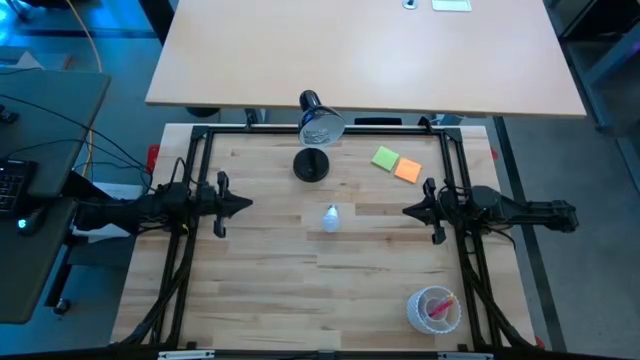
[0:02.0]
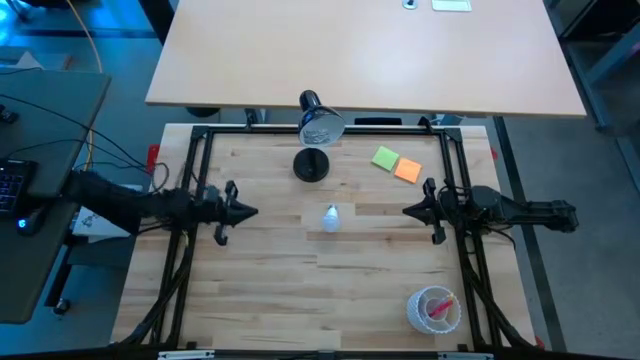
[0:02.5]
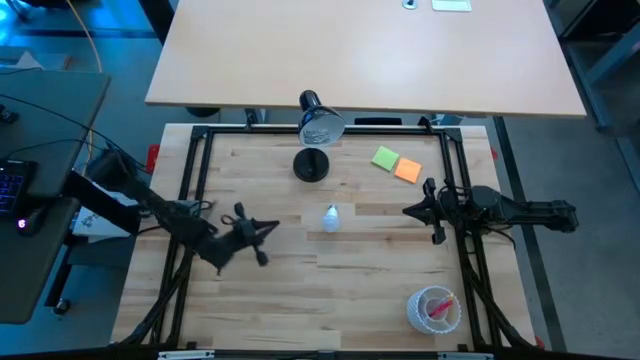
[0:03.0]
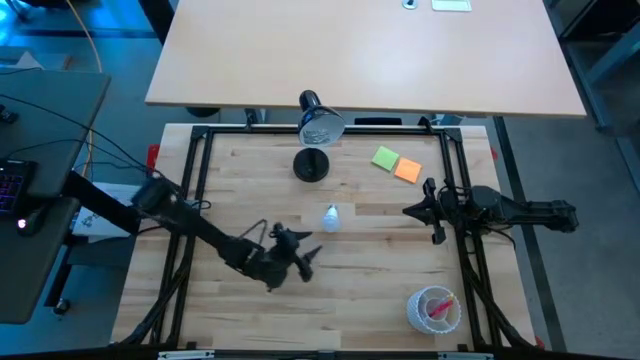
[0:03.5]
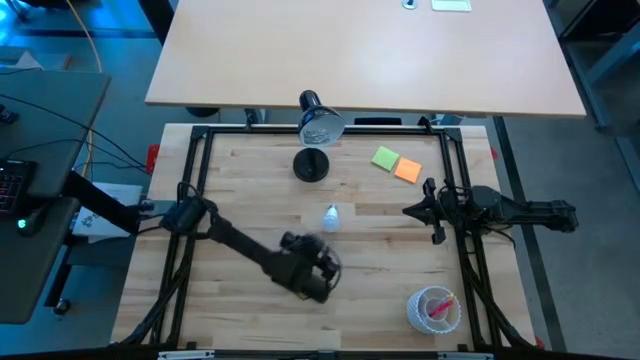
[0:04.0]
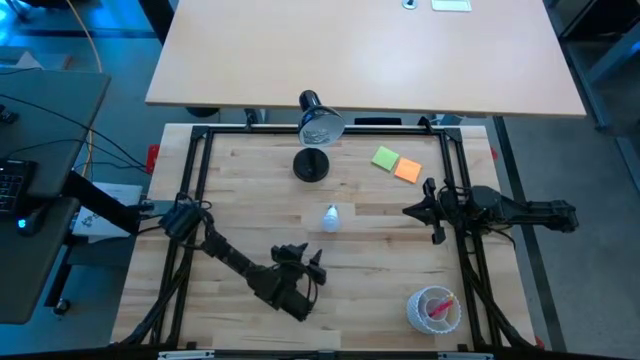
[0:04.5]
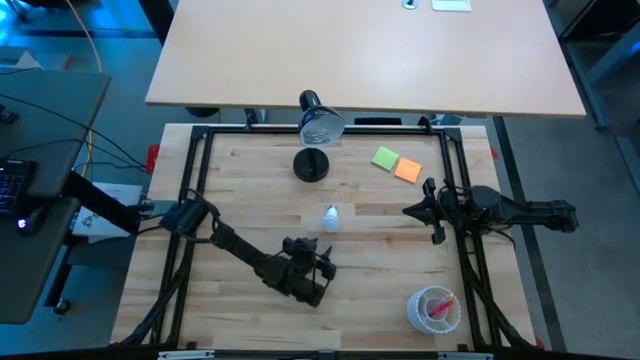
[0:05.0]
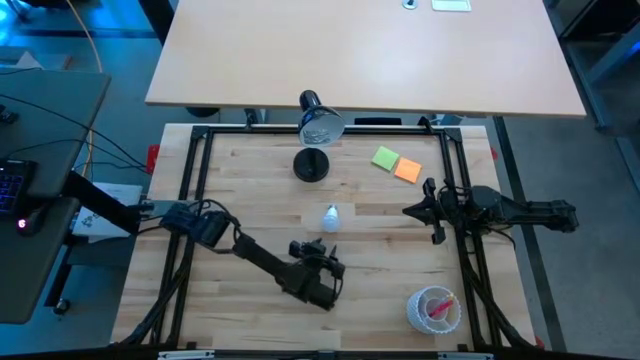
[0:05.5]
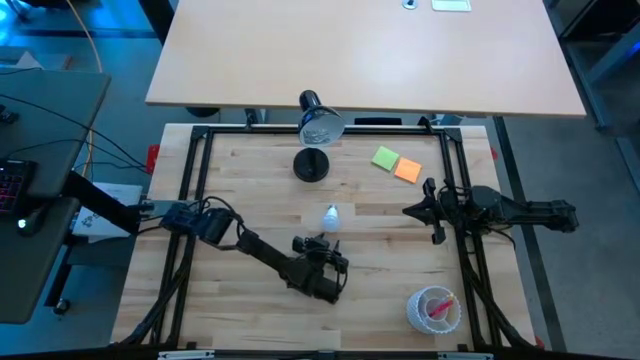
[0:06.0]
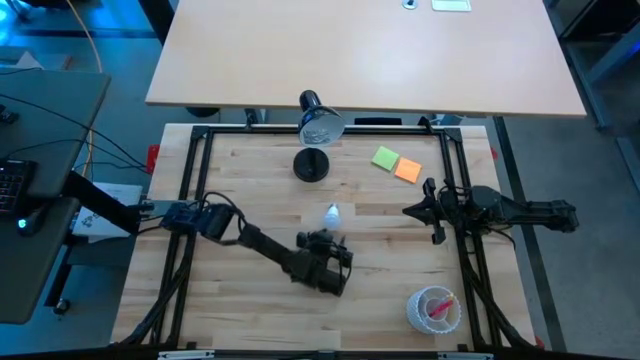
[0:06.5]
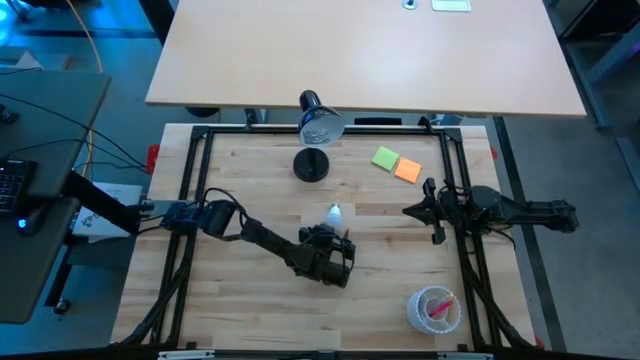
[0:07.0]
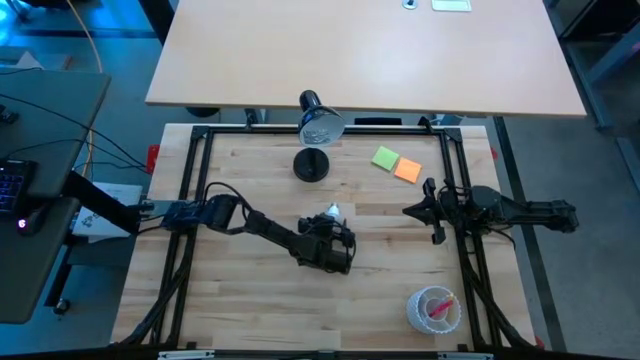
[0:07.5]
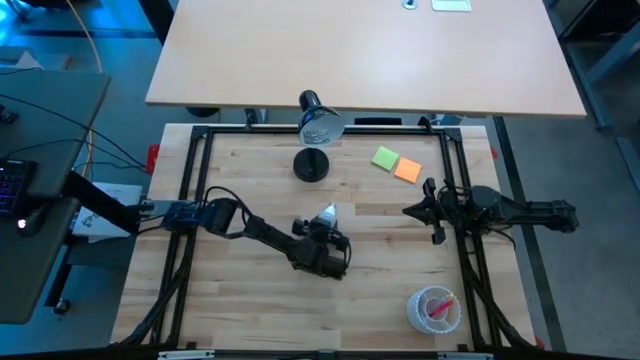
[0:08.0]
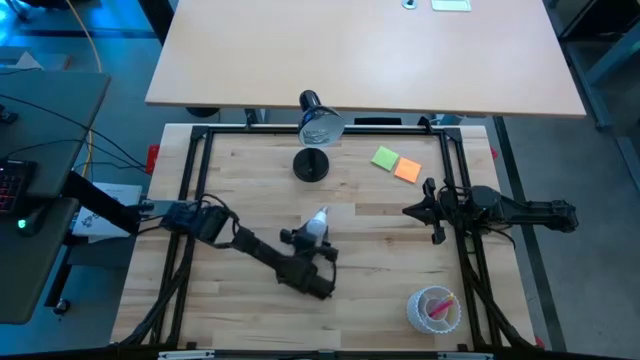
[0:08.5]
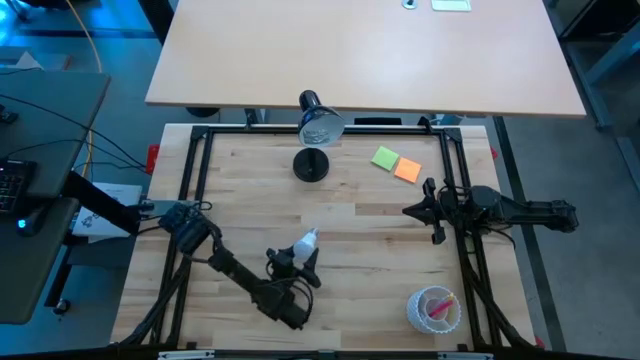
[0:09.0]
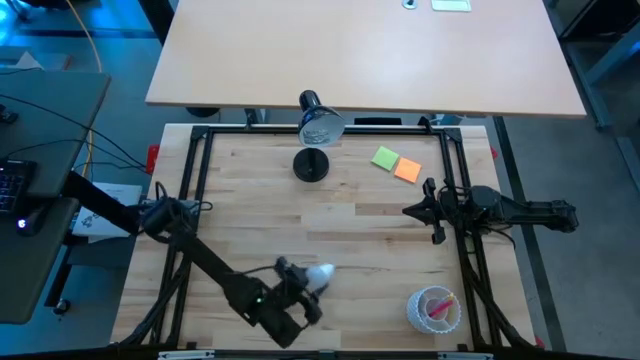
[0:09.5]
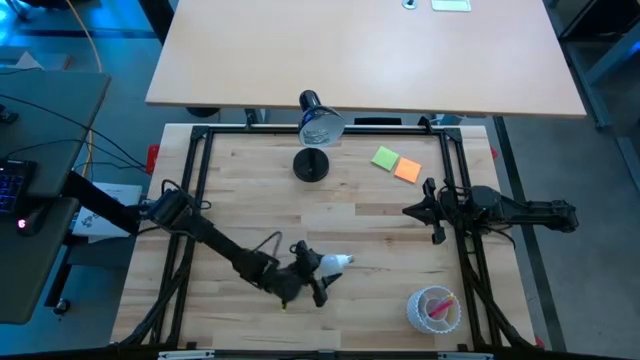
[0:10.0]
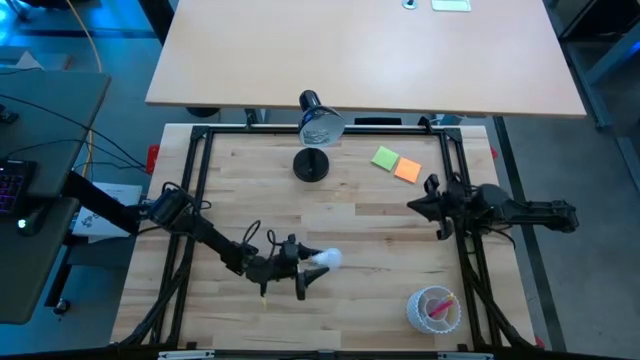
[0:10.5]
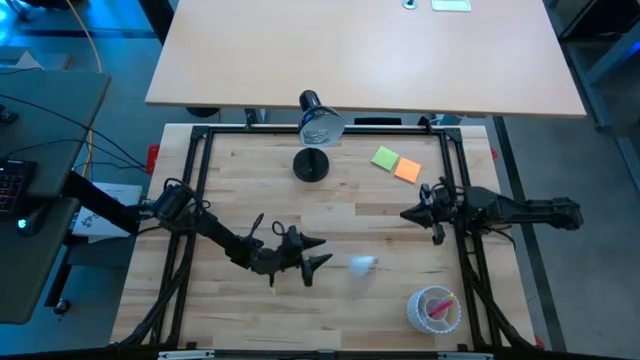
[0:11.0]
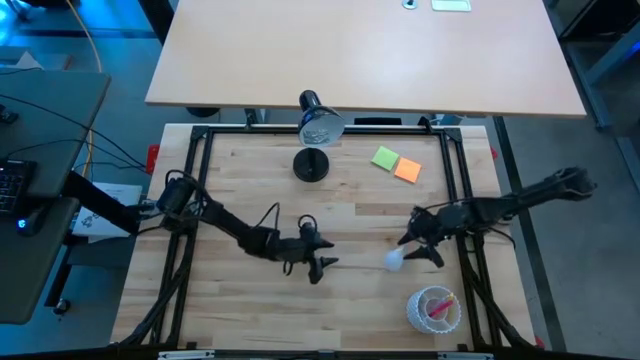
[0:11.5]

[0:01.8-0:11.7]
Task: Screw lightbulb
Insert the white lightbulb into the black lamp

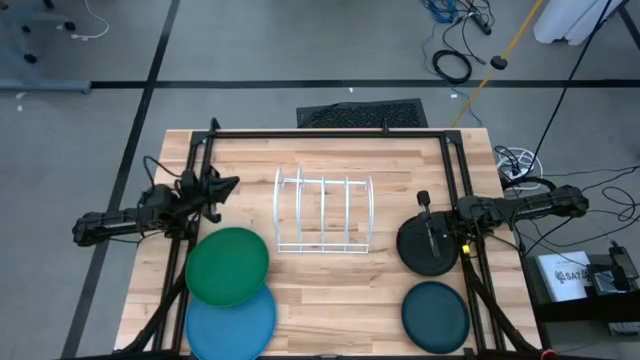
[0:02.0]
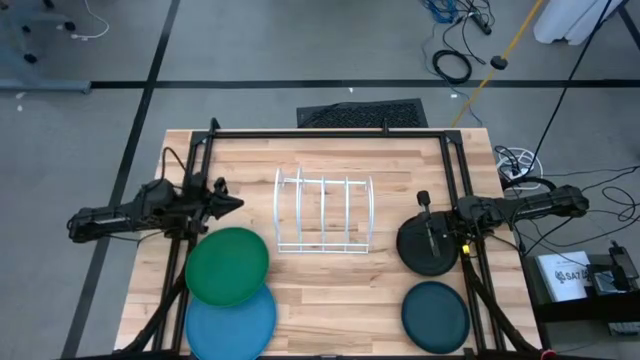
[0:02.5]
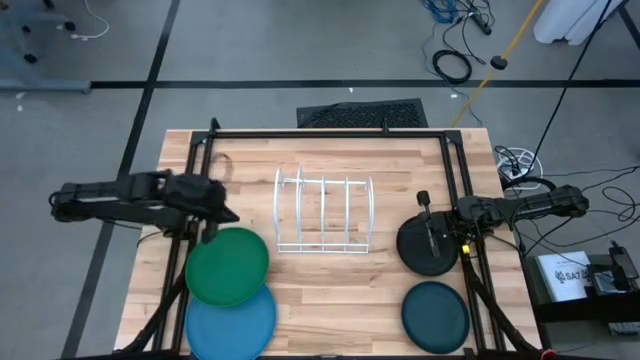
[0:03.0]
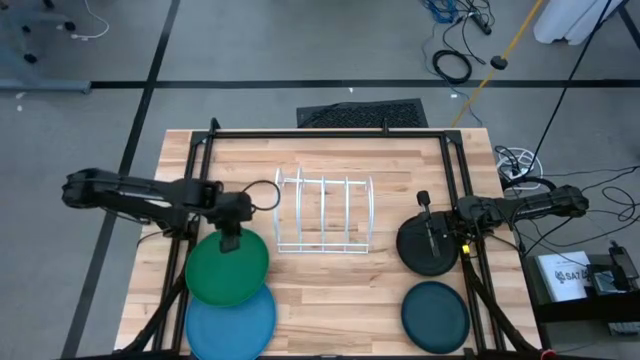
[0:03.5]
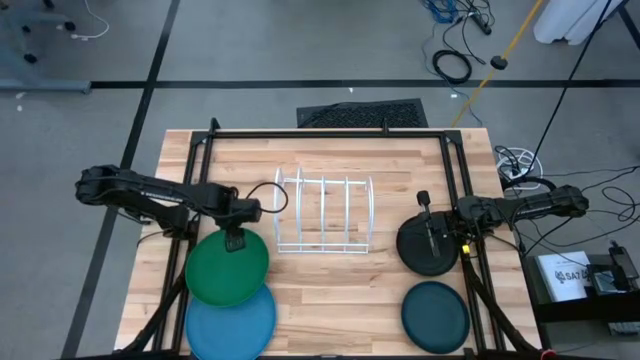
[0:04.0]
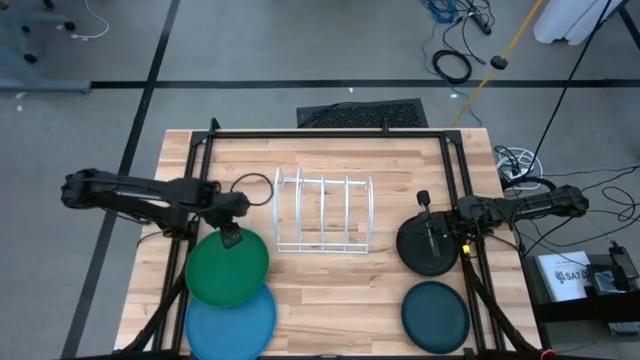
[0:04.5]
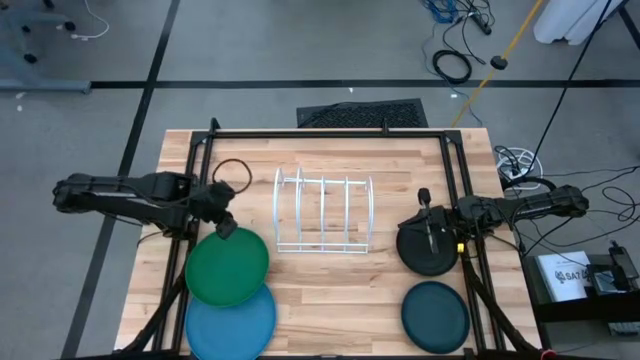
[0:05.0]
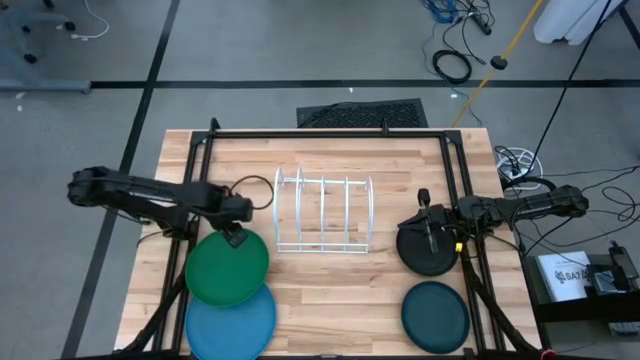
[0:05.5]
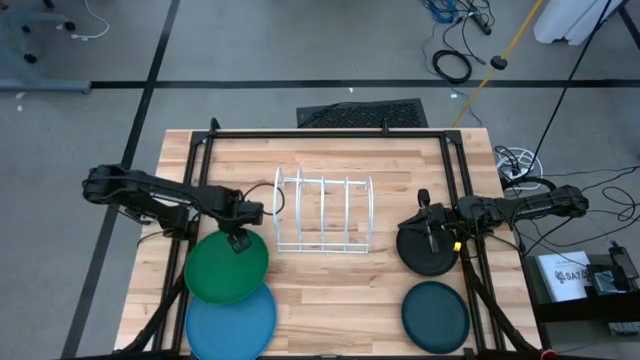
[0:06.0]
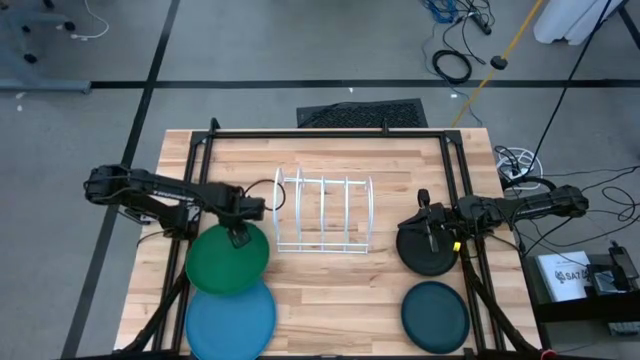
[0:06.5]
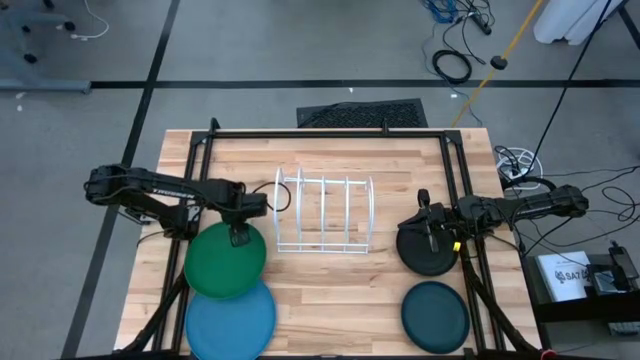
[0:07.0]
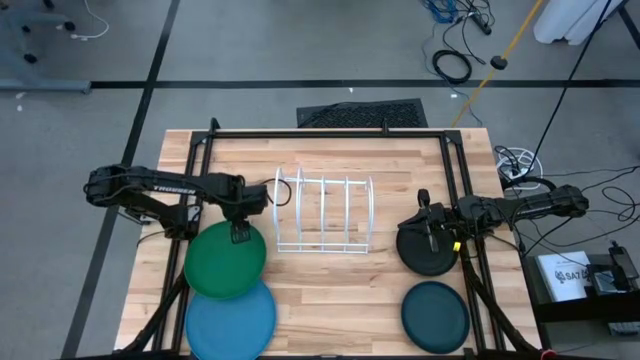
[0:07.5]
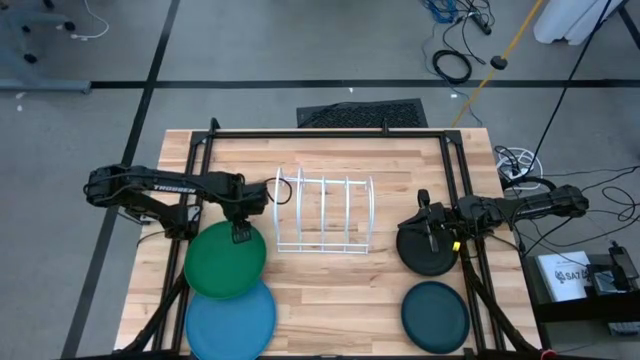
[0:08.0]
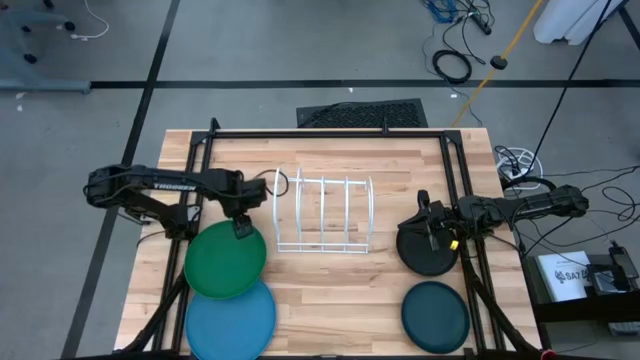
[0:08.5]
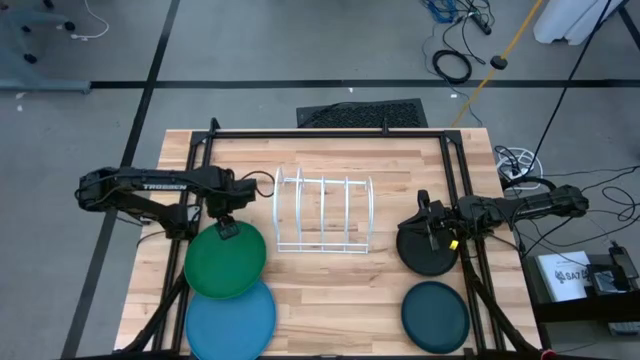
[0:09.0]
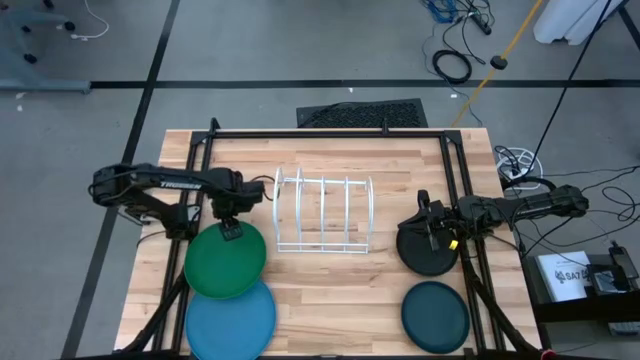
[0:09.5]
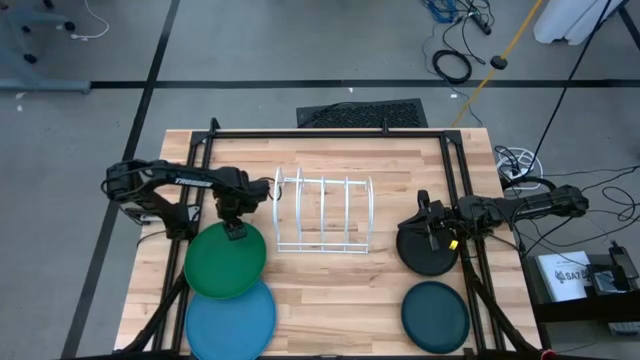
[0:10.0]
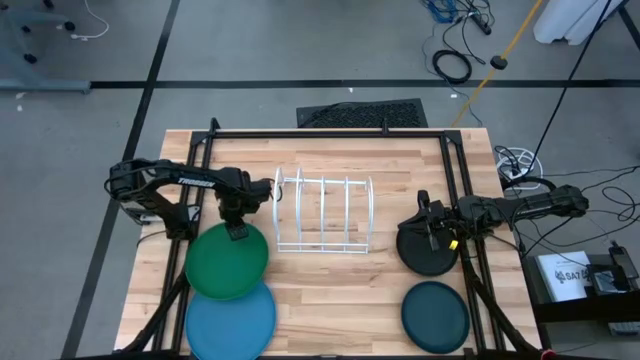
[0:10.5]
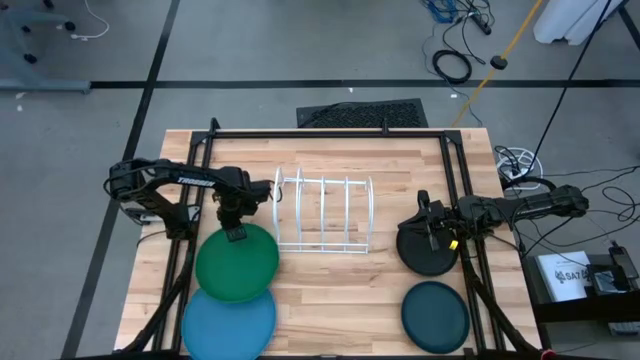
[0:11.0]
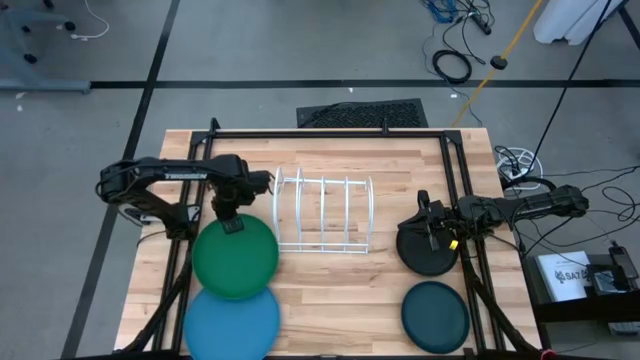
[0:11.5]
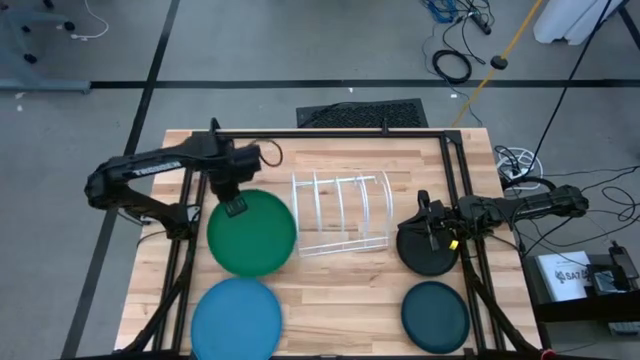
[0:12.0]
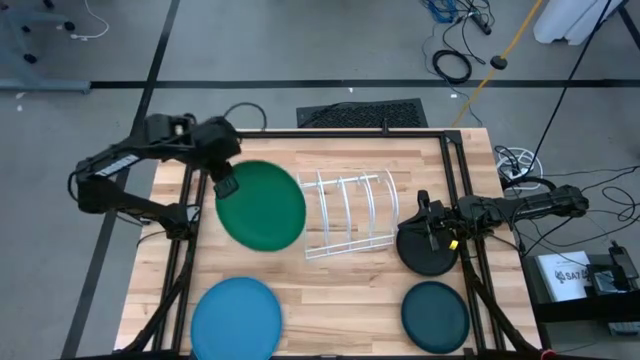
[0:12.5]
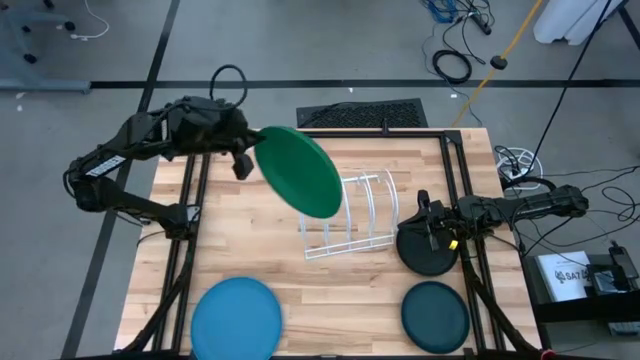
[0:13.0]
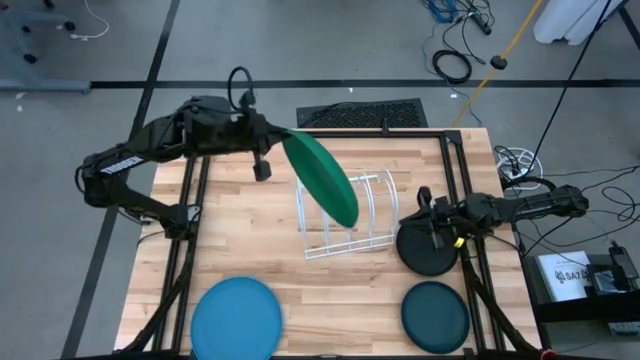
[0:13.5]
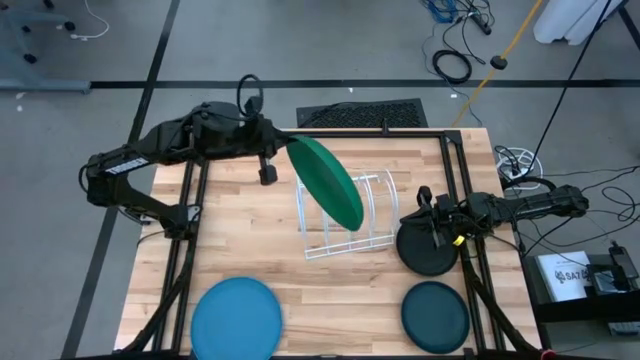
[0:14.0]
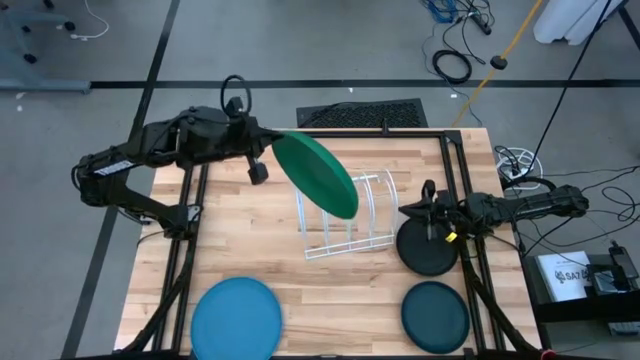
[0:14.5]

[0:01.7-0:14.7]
Task: Sort dishes
Put the green plate into the dish rack
